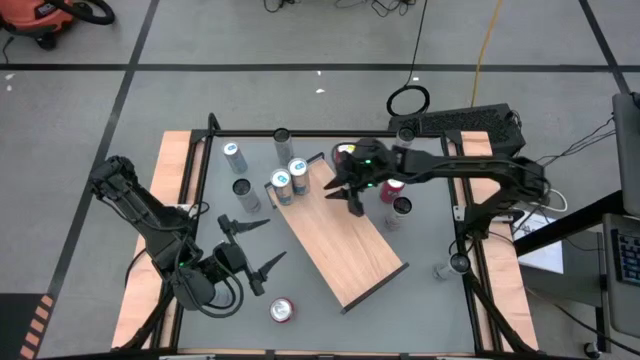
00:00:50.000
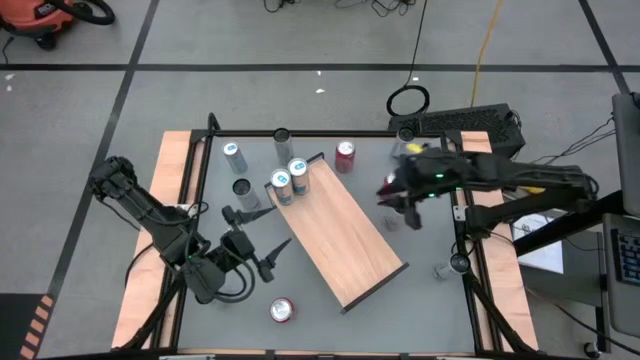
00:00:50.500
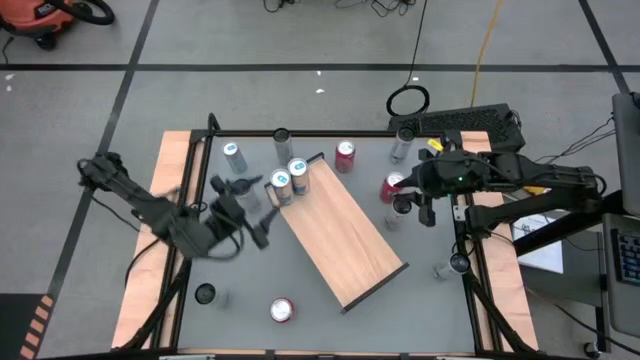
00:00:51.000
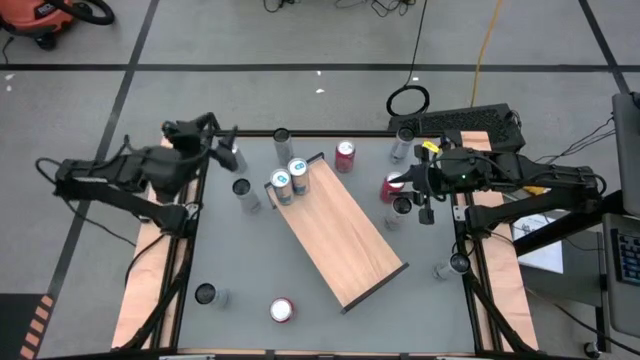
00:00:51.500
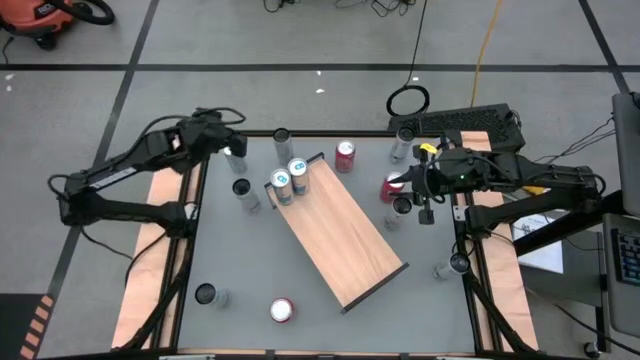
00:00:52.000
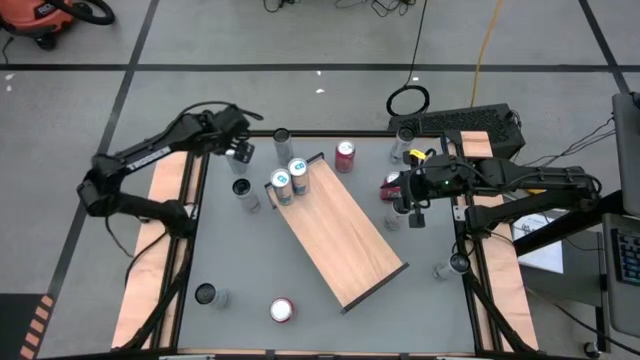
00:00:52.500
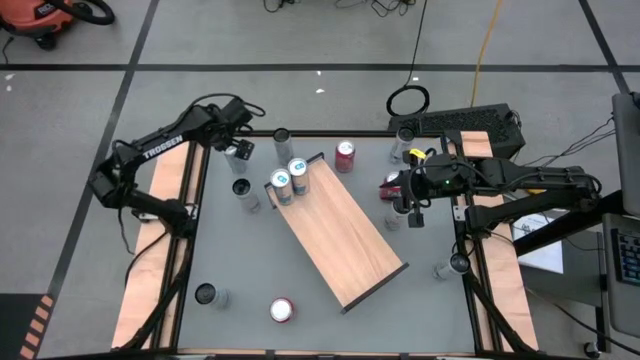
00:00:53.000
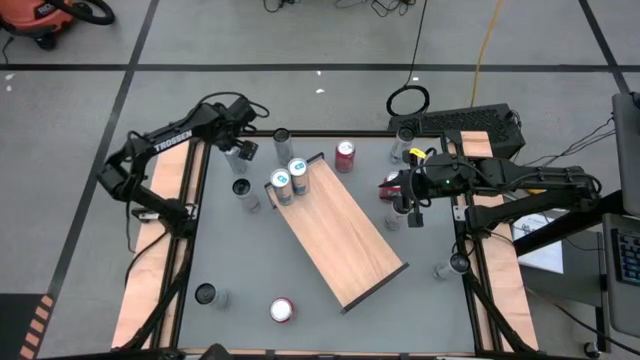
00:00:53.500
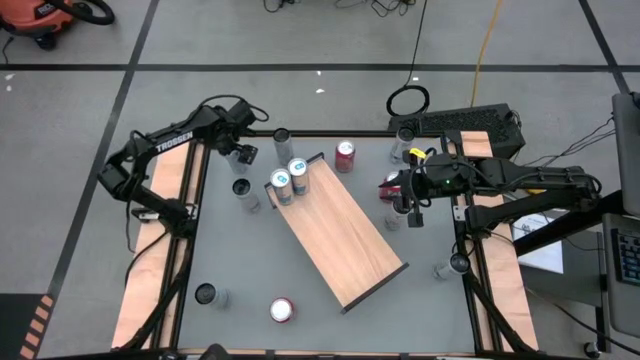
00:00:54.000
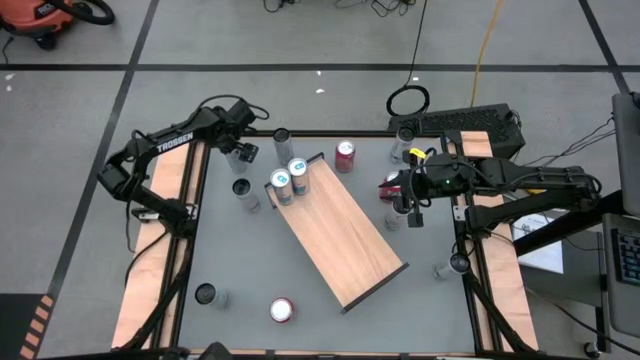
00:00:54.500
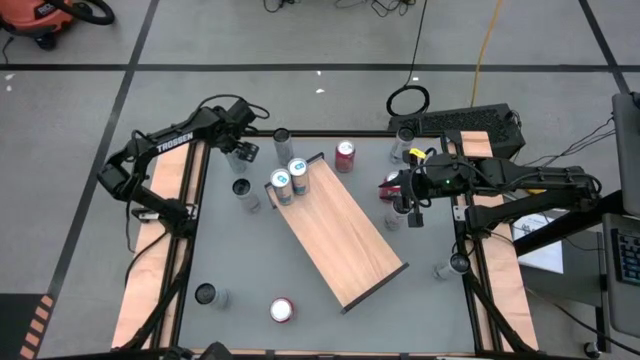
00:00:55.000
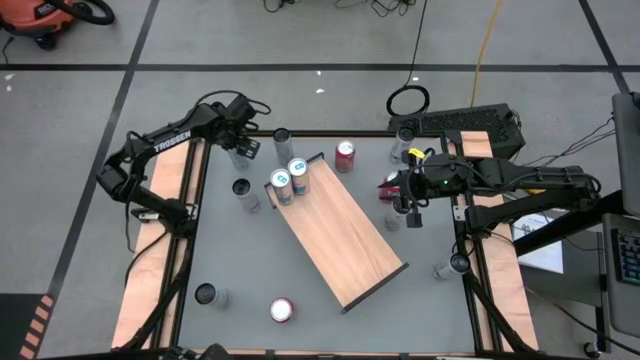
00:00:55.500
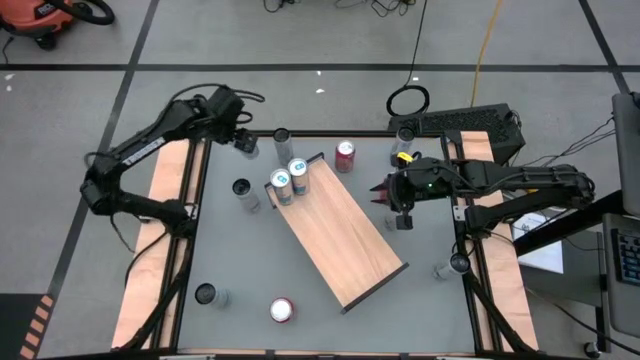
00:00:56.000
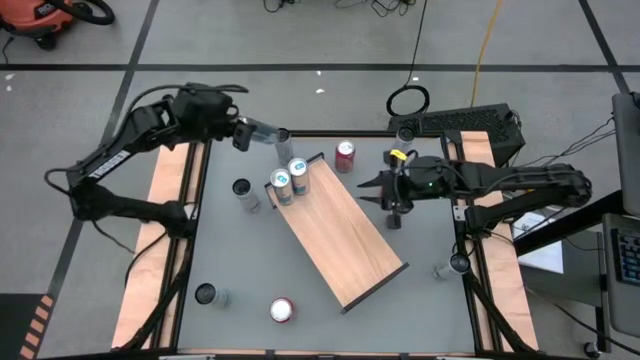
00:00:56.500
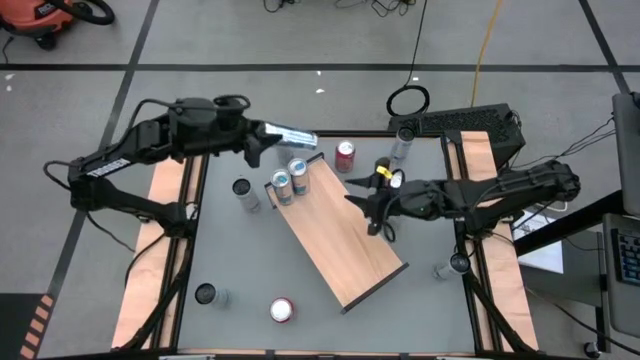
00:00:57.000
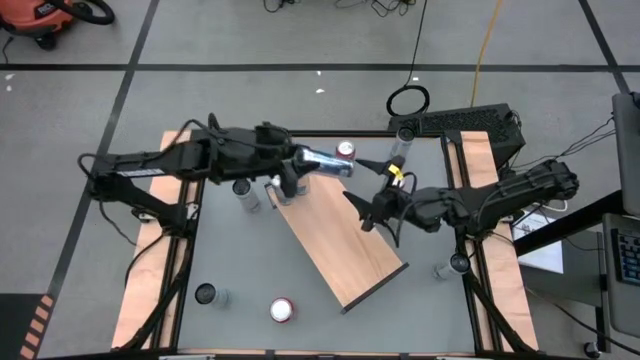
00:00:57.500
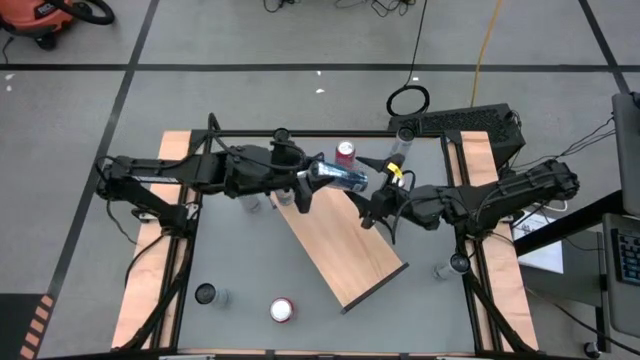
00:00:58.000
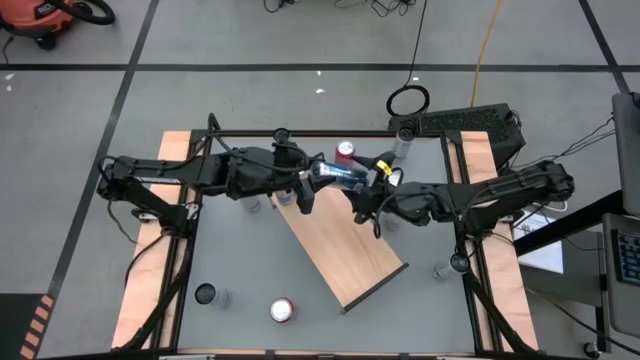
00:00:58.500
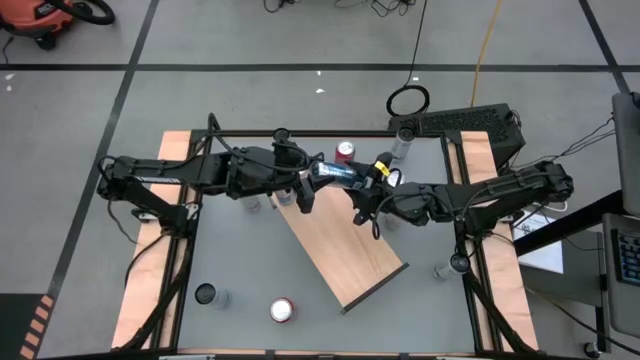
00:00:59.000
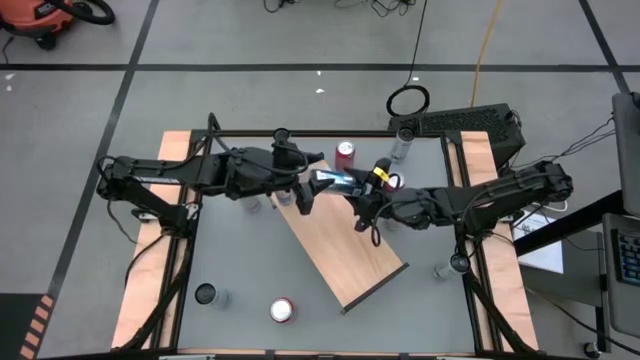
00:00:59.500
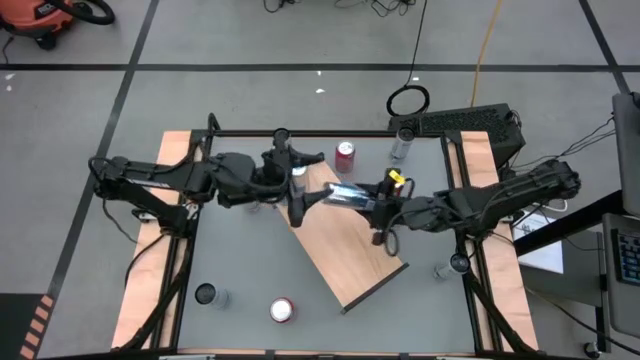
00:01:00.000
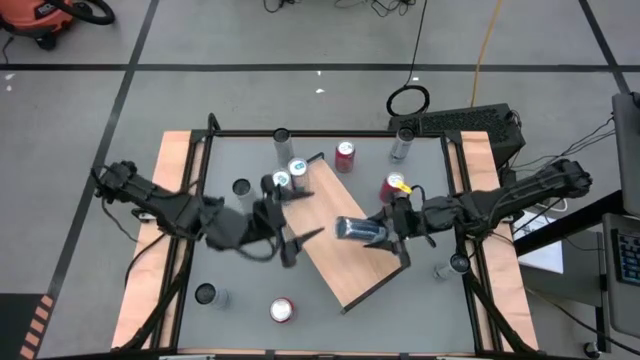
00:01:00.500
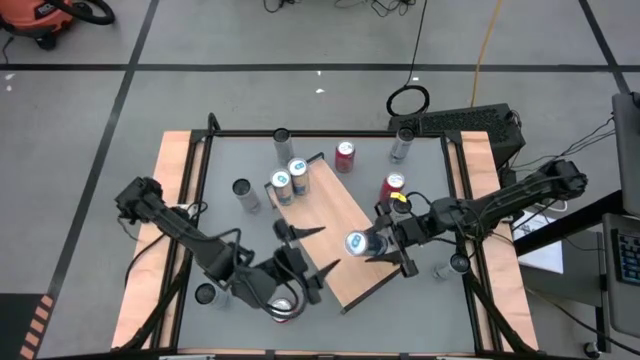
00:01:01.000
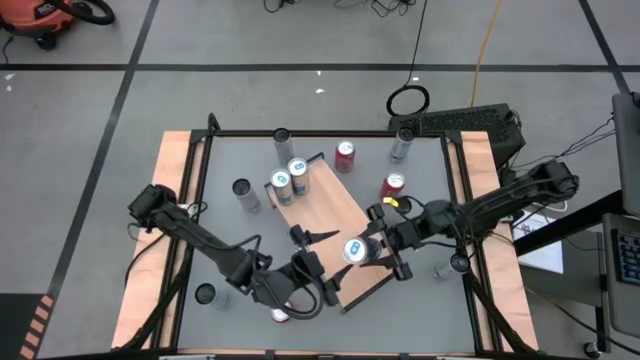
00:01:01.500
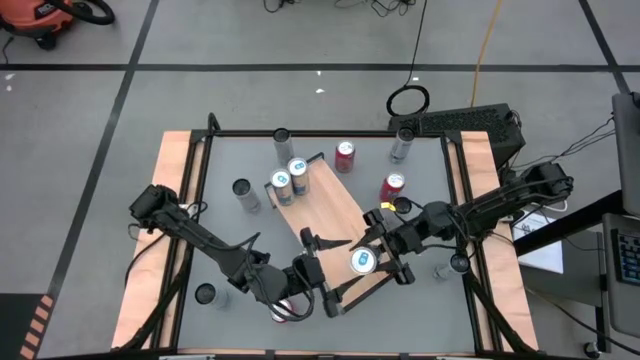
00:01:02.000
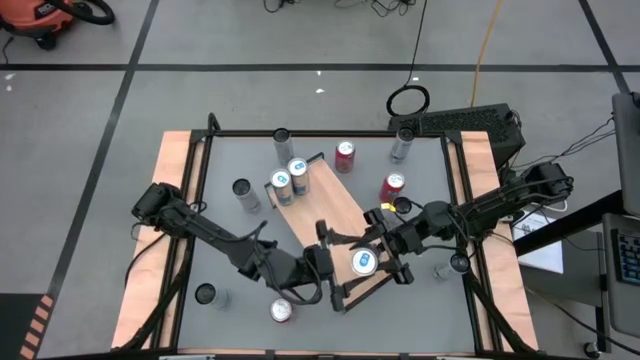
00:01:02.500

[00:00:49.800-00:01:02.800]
Task: Place canned beverage on shelf
Put the silver soda can on the shelf aligned with the other silver soda cans

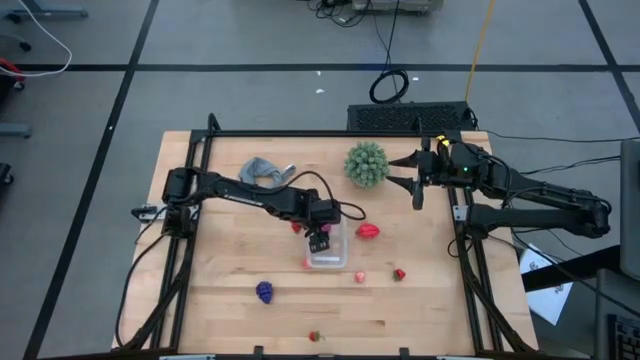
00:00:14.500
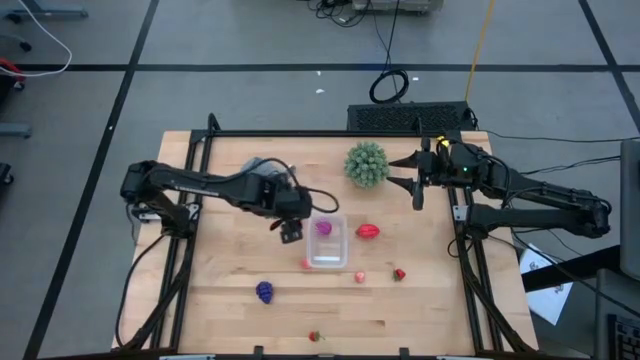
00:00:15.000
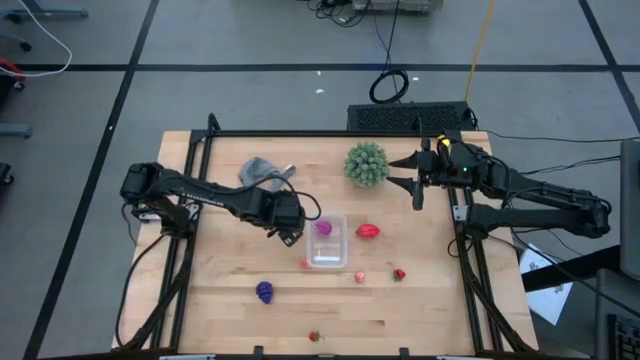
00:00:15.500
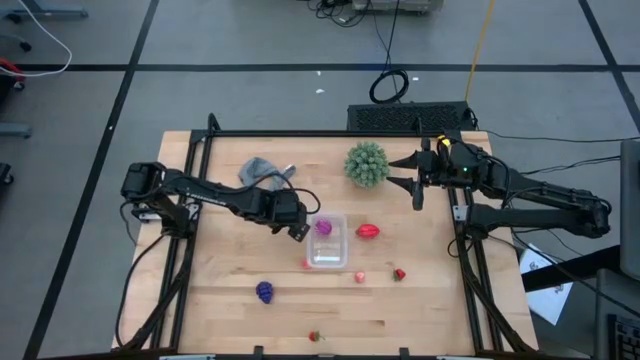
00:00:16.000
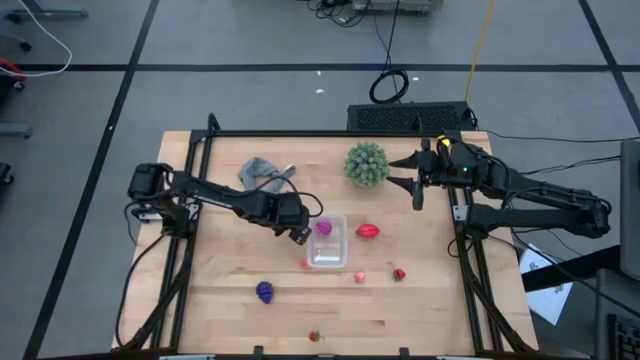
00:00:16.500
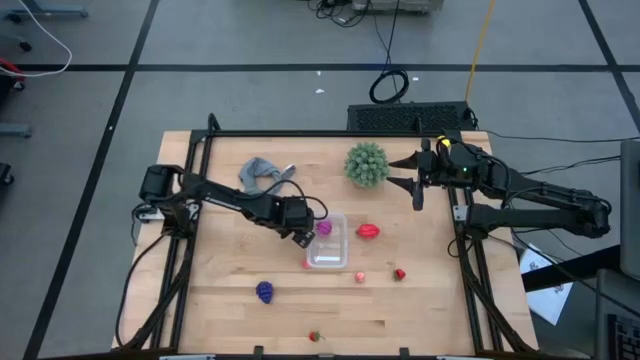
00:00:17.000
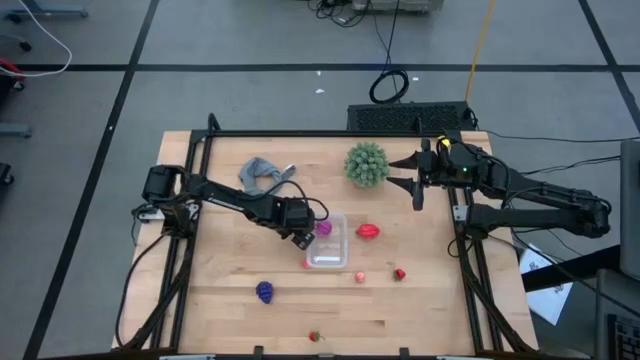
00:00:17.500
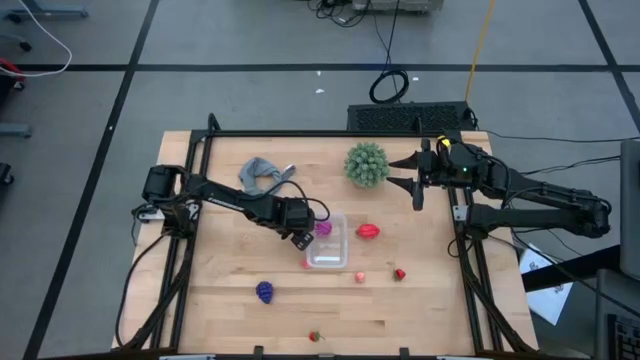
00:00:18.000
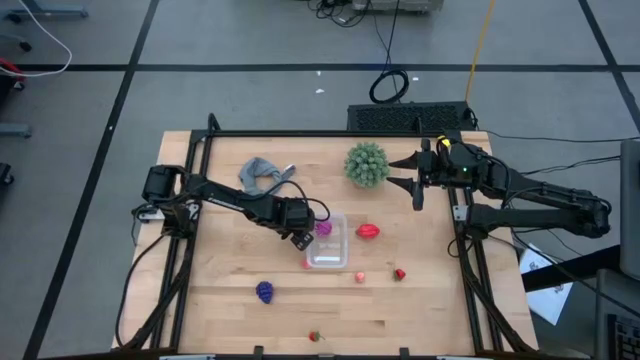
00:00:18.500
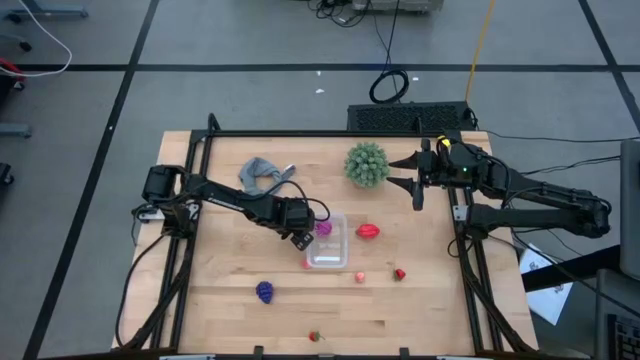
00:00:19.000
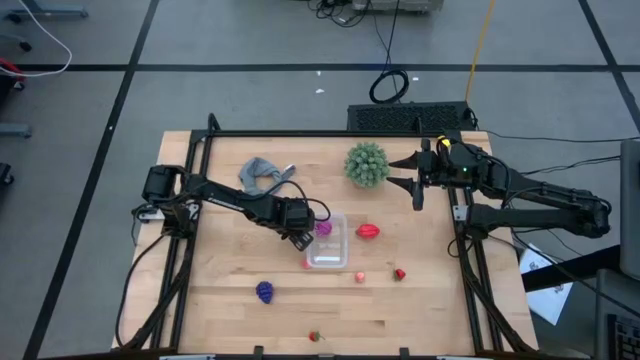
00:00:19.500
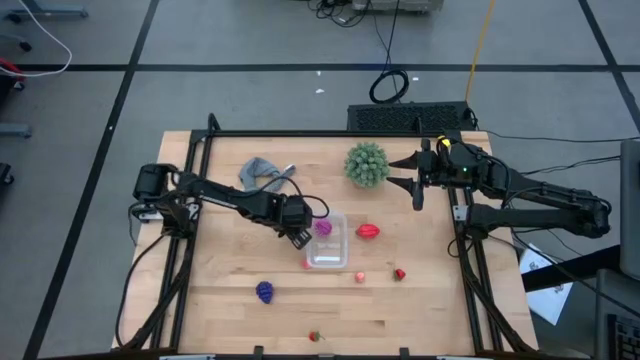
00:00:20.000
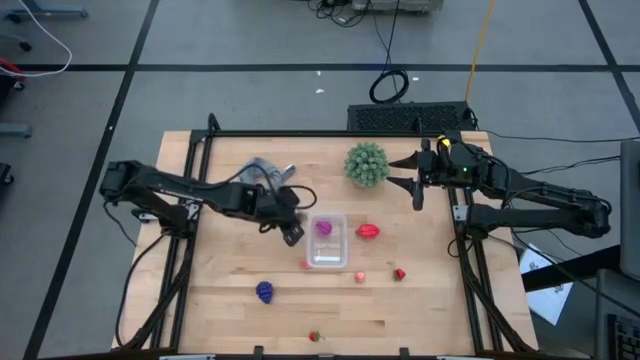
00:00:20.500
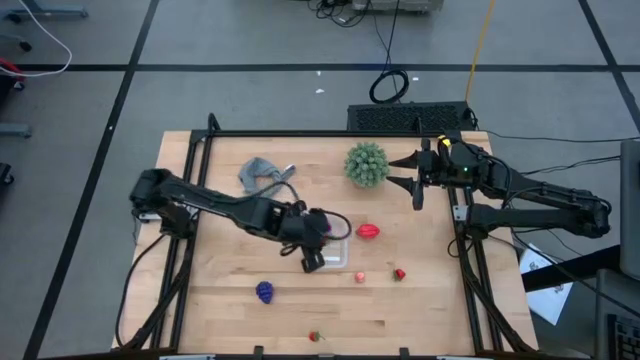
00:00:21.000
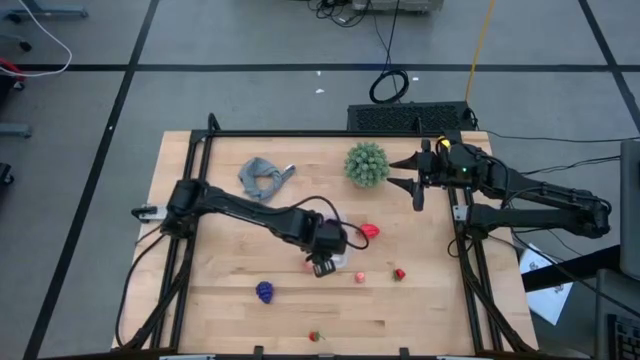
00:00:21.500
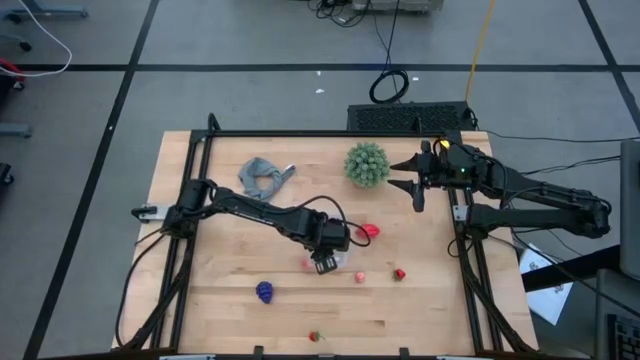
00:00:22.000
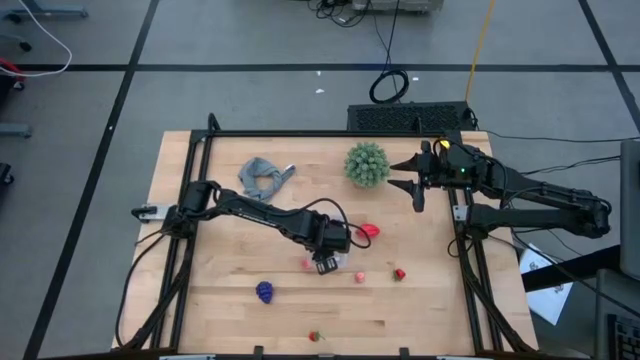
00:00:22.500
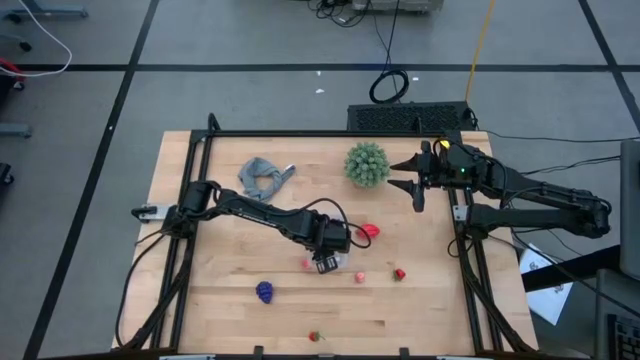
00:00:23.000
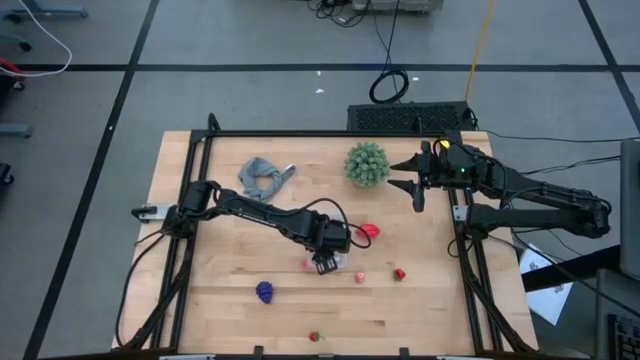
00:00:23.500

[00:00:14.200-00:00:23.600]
Task: Pick and placing Produce into tupperware
Put the top left strawberry into the transparent bin
